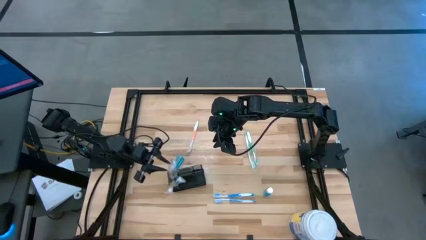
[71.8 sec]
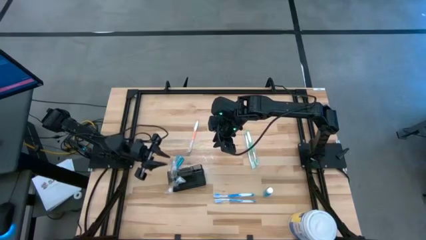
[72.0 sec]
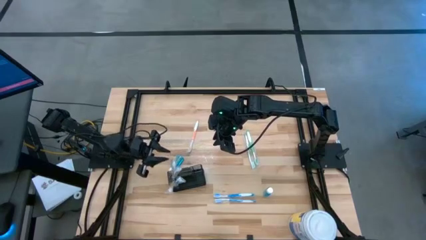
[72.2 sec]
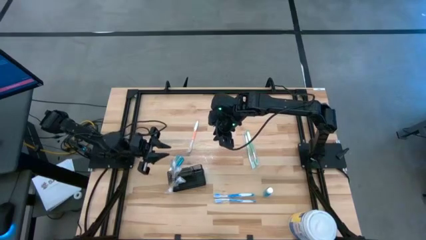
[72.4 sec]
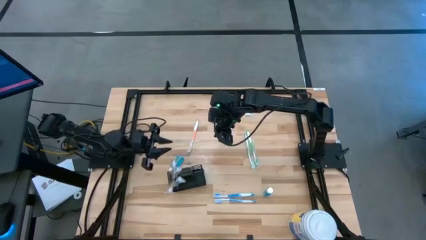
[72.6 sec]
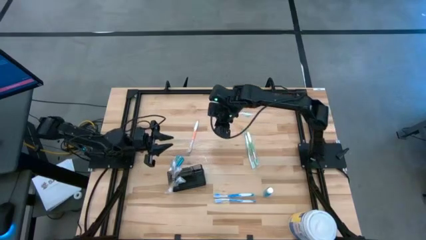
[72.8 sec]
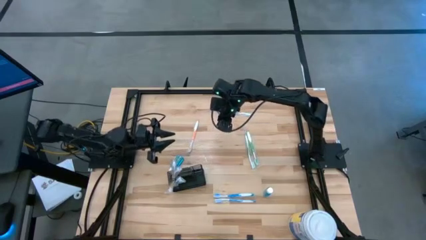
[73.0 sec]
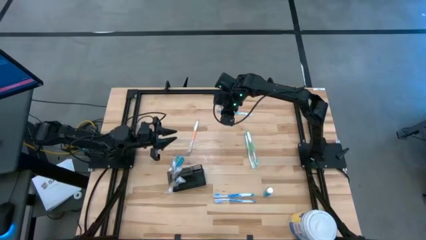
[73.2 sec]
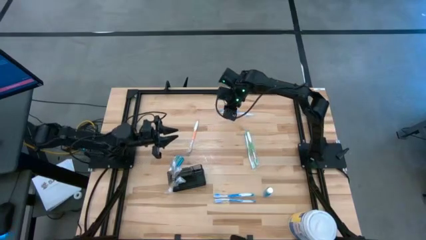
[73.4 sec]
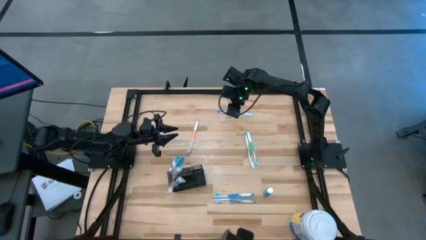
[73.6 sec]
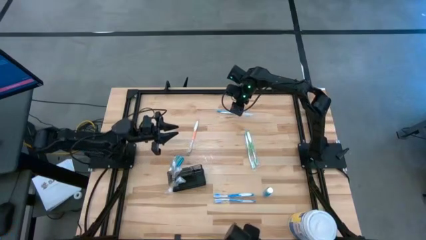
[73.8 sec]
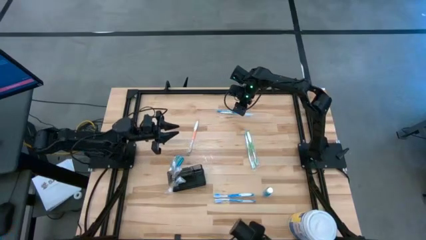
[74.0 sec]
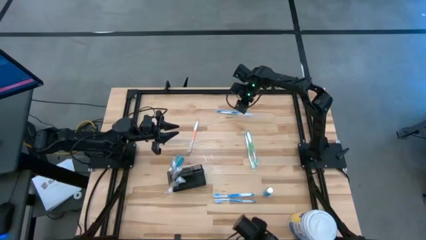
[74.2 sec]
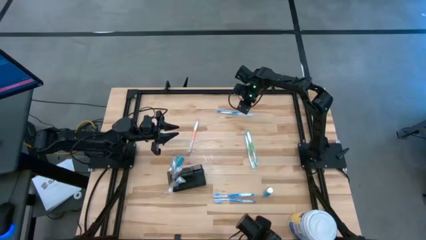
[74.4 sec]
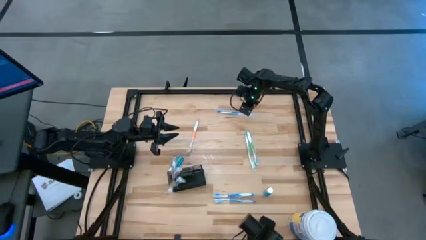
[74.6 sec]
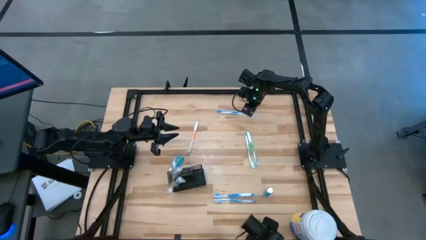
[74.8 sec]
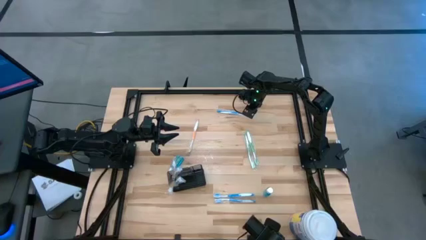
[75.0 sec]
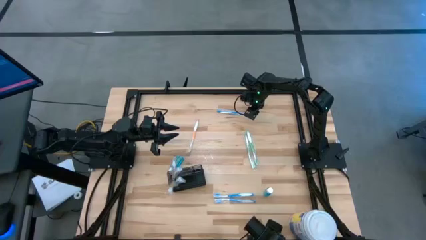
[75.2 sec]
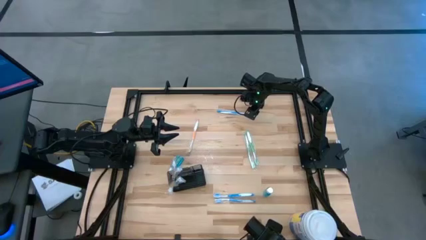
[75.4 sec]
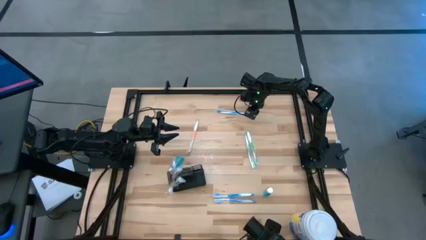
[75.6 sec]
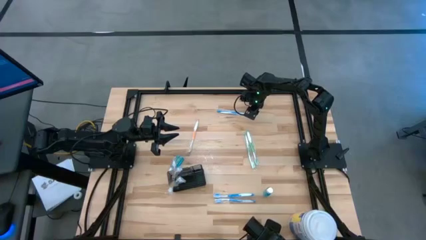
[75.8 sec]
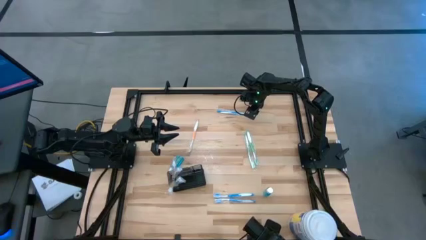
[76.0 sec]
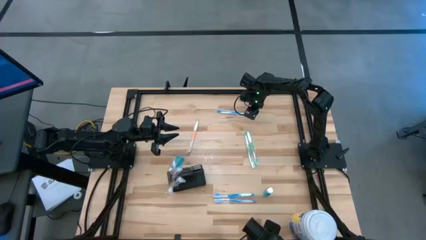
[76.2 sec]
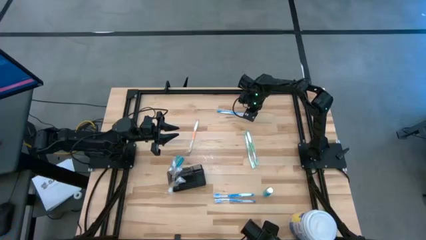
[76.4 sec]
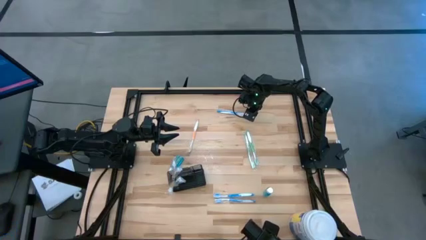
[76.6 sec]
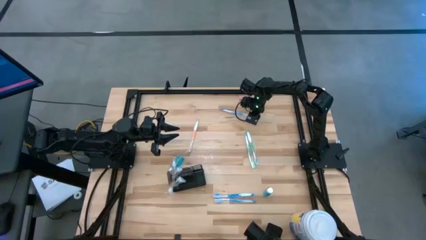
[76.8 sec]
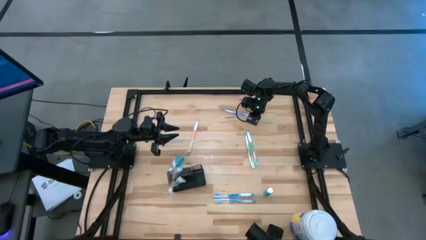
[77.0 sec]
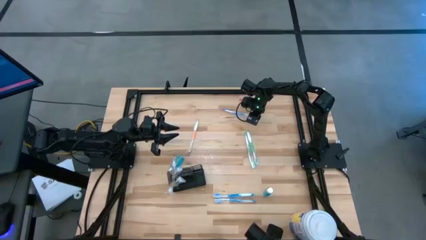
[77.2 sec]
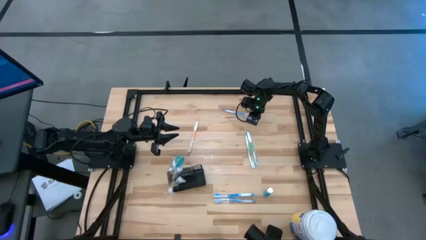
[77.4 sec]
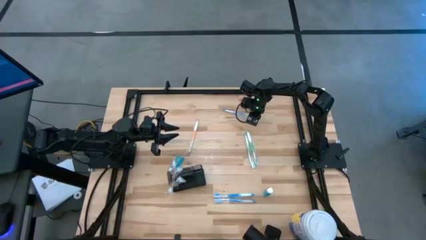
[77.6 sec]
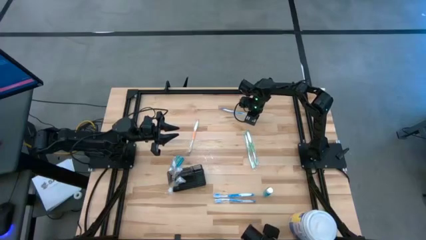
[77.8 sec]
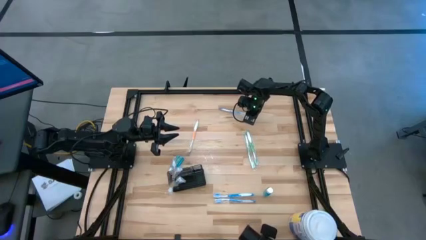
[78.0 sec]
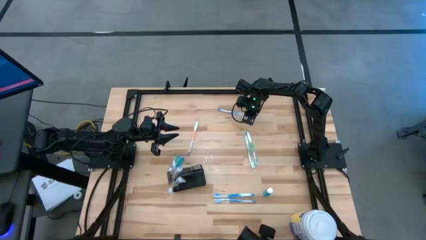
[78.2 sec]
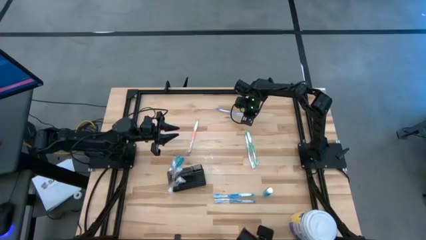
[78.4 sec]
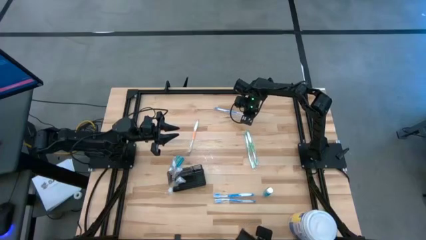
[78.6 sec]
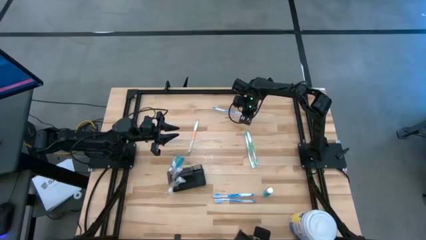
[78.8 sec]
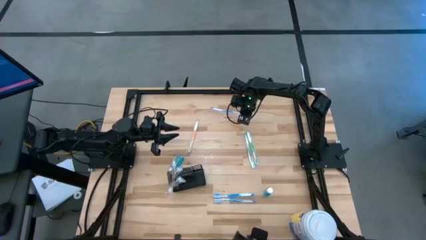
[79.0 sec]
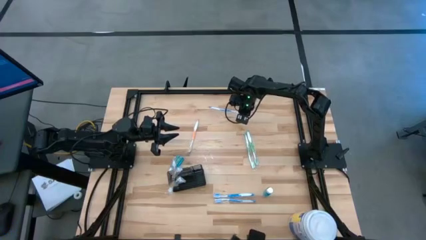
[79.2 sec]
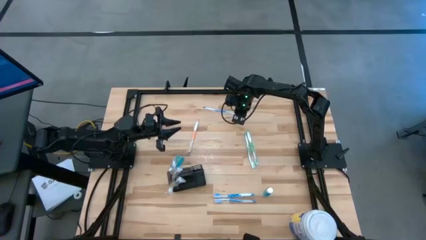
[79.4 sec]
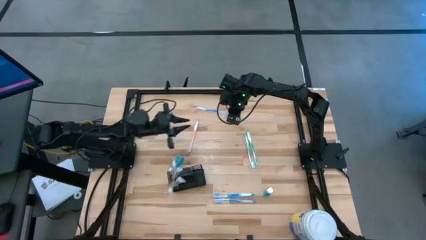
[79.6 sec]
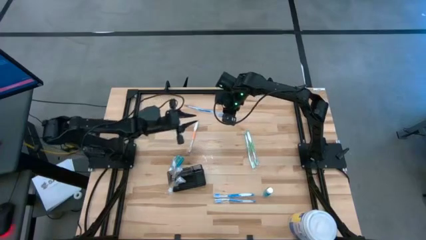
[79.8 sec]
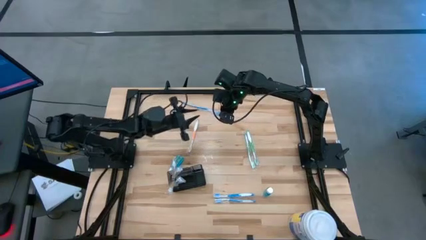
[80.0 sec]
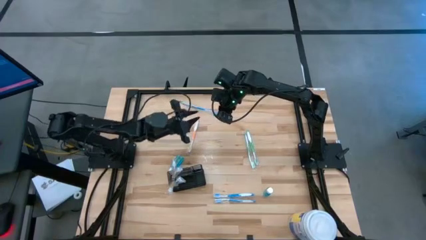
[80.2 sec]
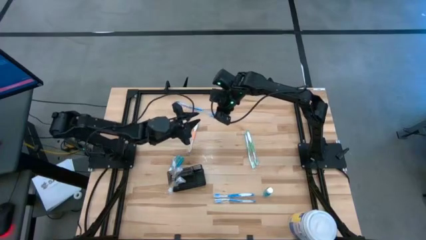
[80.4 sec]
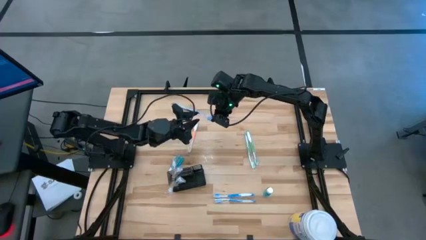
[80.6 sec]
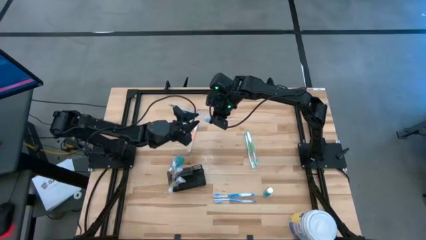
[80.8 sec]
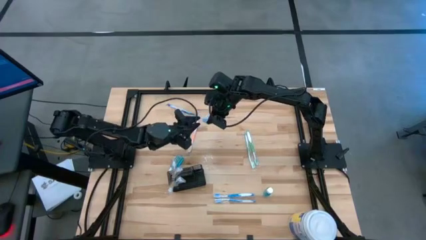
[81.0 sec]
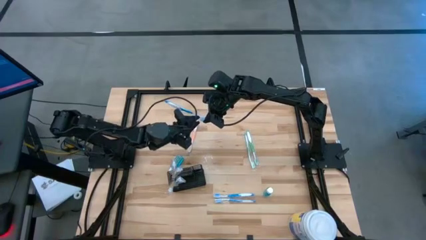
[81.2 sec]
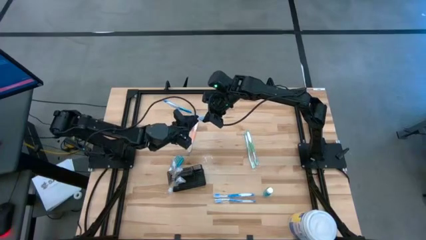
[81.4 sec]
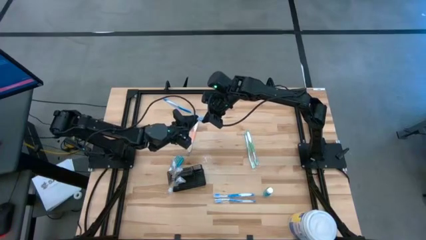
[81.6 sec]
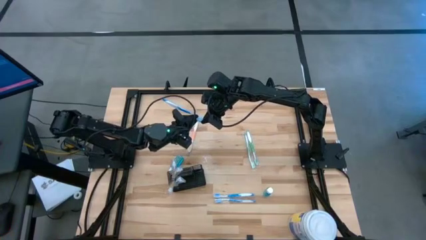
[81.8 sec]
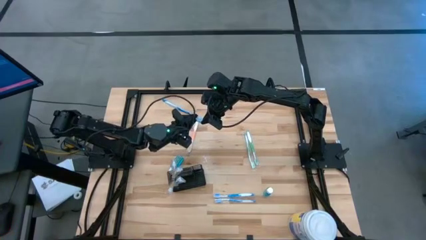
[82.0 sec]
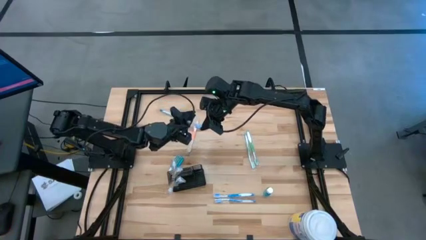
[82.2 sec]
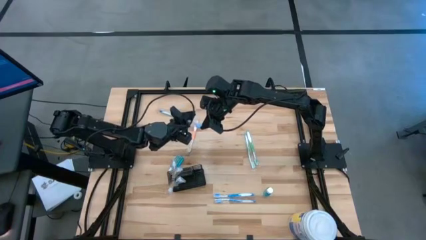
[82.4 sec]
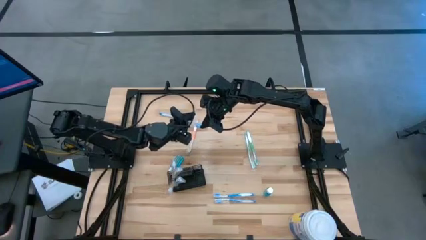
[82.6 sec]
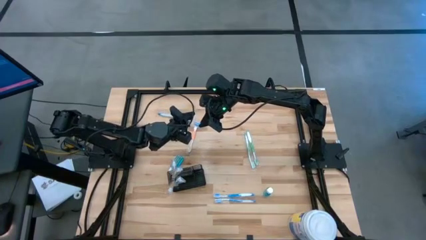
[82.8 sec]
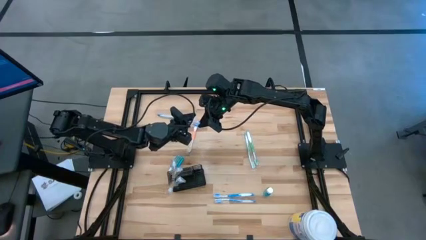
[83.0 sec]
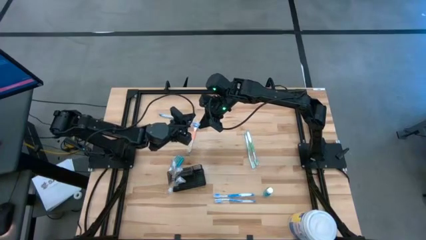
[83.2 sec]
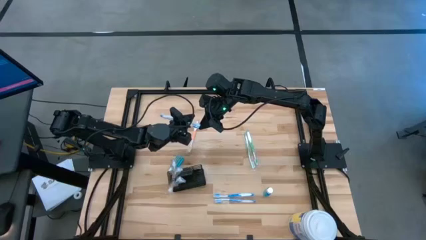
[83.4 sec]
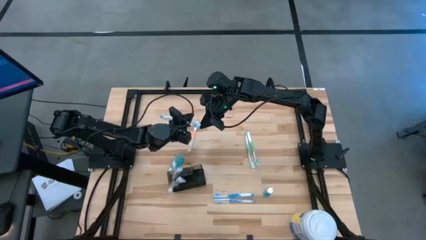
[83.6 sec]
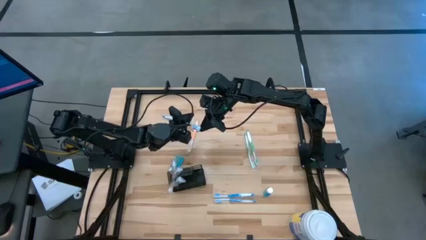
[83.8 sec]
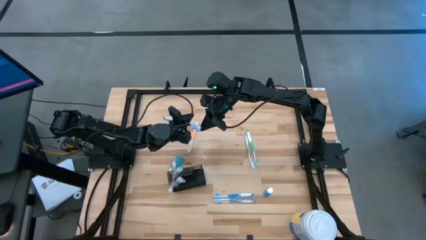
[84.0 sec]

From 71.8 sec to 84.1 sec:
Task: Pick & Place toothbrushing station
Put the white blue toothbrush into the black toothbrush rack

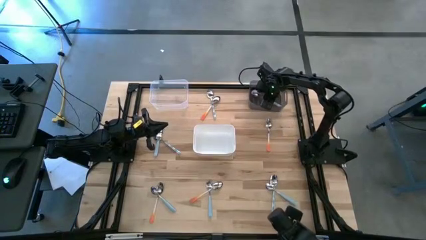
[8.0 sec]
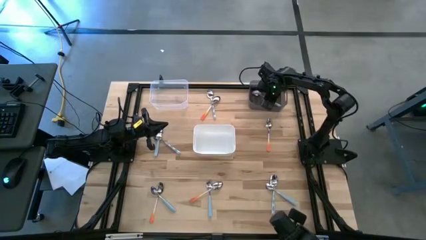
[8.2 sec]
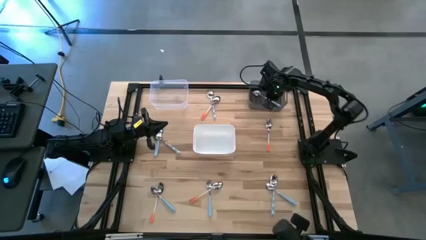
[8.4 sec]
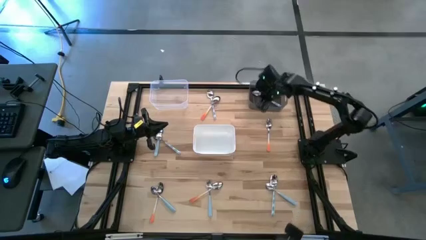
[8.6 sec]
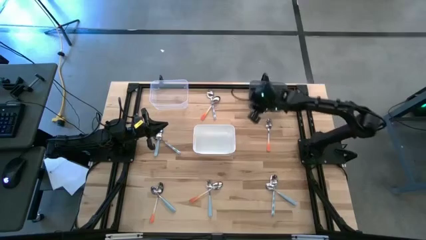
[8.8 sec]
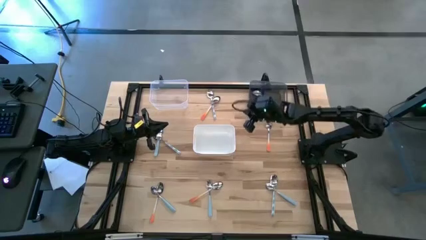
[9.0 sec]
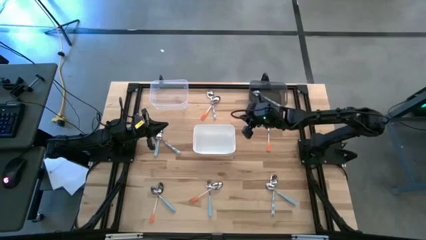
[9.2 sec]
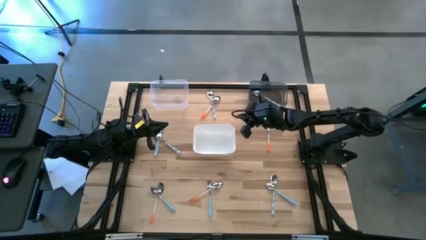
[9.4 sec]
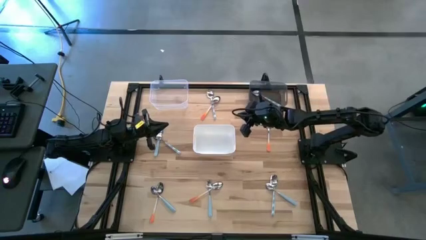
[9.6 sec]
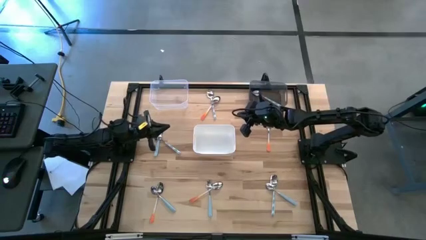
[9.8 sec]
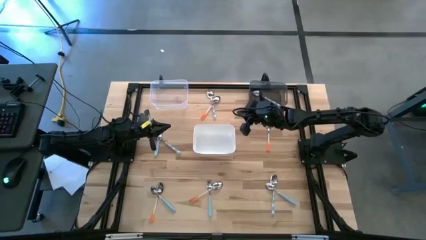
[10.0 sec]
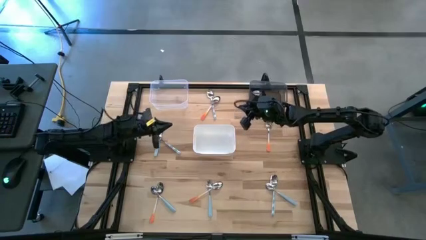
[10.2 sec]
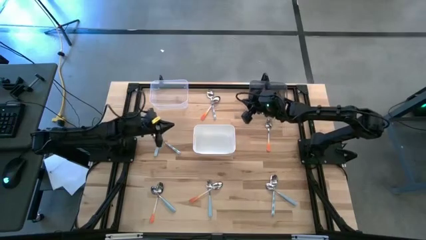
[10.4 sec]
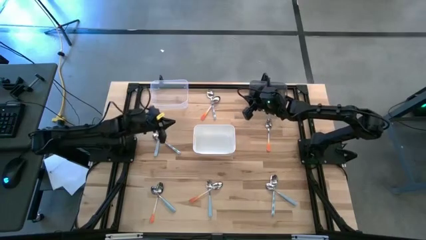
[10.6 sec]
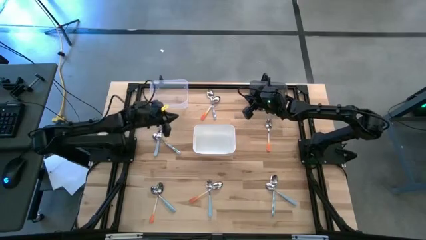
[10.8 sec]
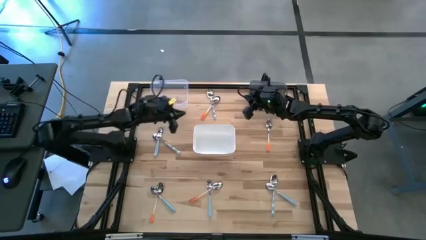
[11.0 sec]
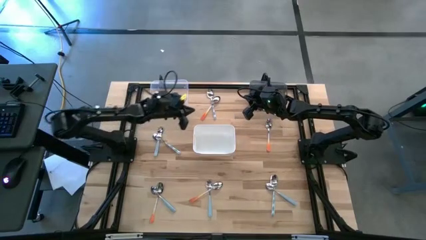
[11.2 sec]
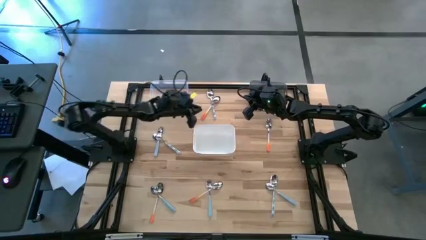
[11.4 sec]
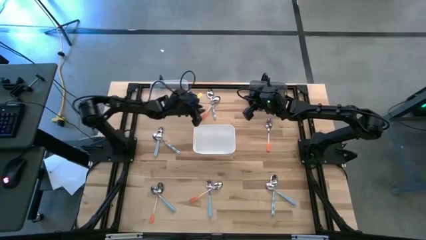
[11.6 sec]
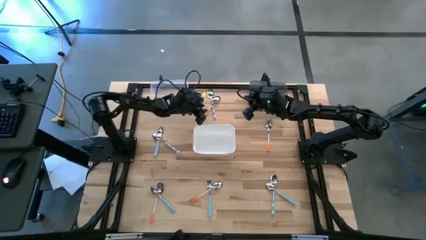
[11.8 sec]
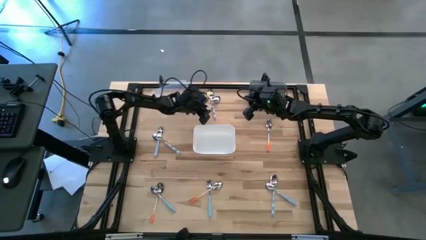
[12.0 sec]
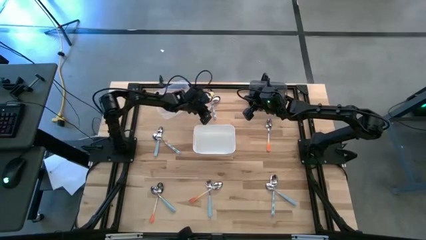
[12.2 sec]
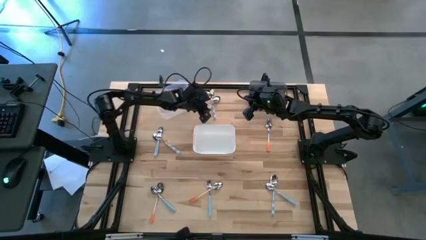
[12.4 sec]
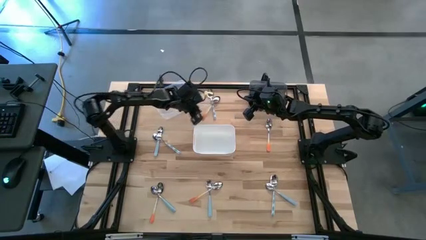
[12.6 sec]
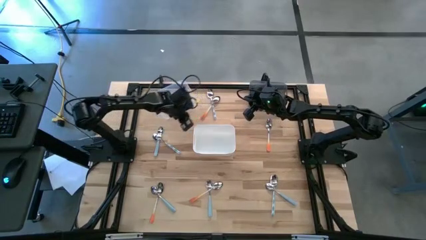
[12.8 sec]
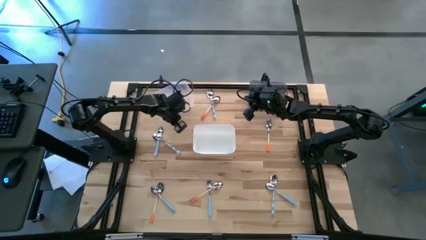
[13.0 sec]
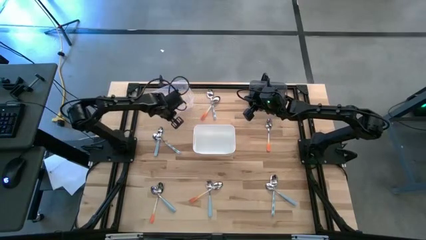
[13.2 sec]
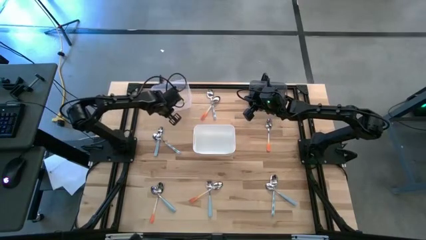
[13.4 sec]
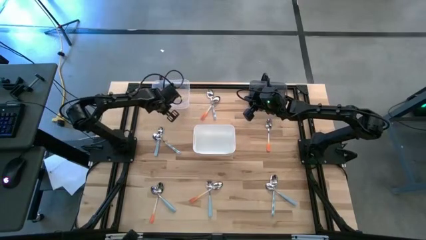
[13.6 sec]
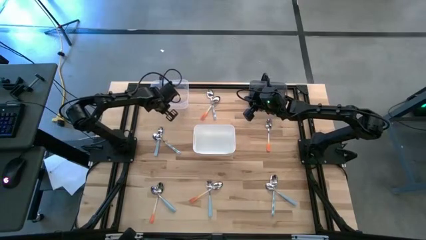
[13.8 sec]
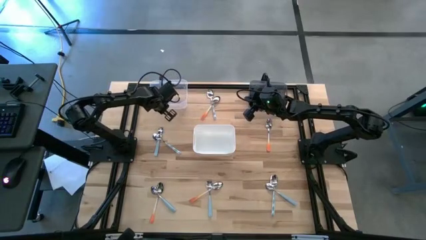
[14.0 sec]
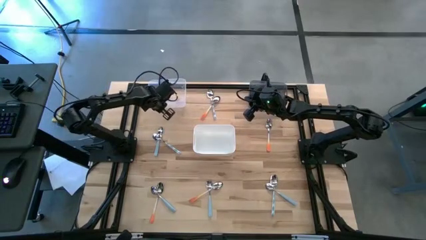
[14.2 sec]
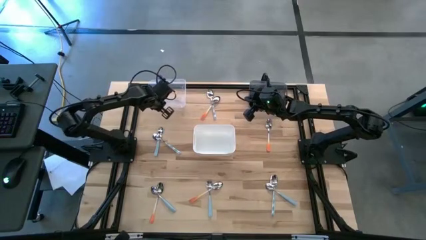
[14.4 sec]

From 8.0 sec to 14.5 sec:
Task: Sort silverware by color (type)
Adjust the transparent bin
